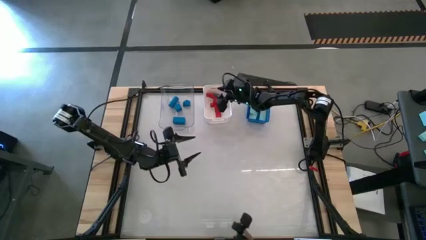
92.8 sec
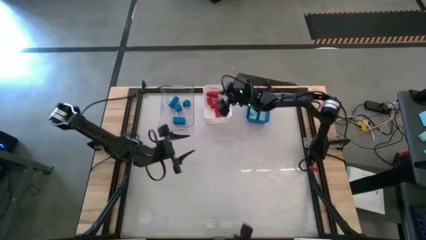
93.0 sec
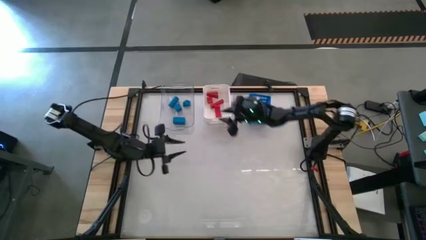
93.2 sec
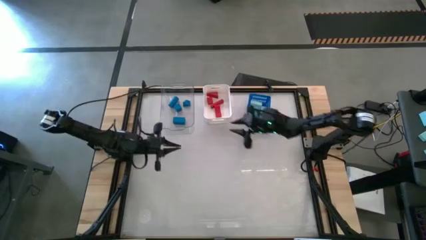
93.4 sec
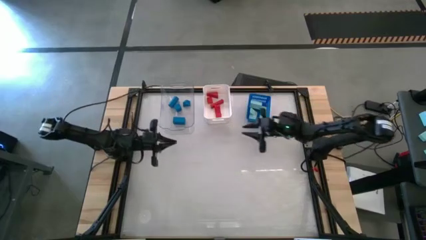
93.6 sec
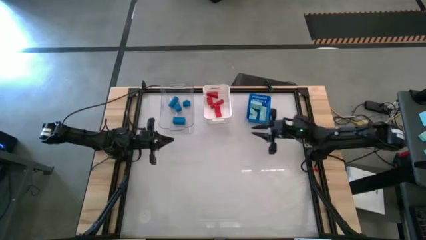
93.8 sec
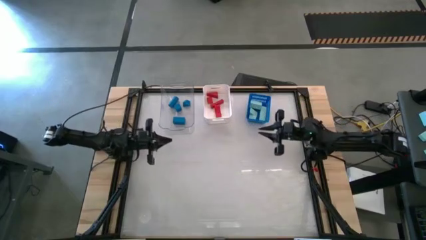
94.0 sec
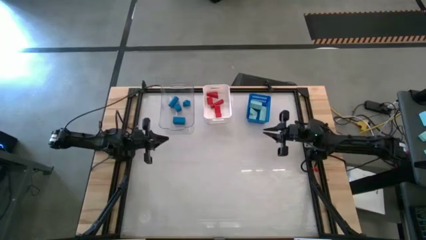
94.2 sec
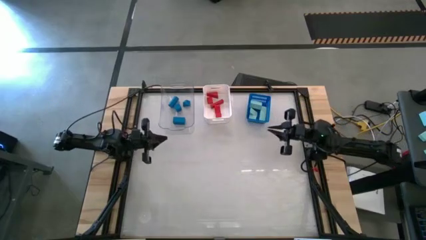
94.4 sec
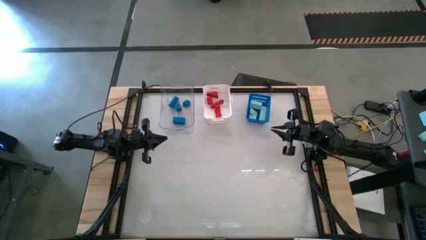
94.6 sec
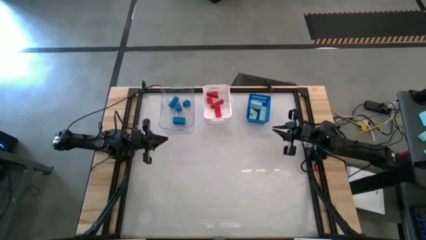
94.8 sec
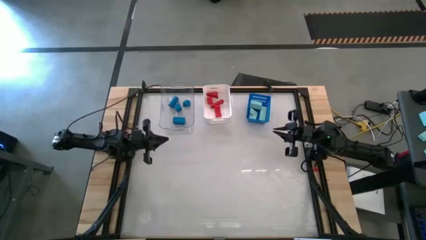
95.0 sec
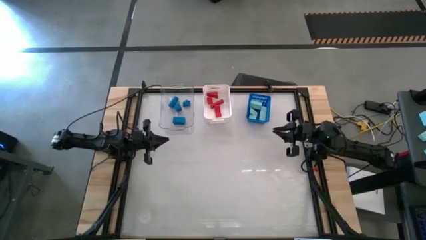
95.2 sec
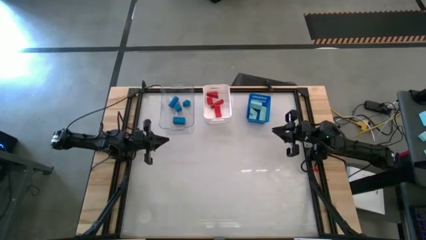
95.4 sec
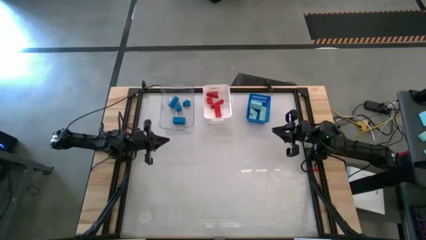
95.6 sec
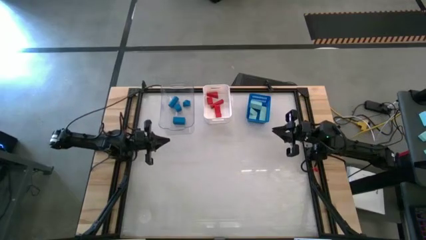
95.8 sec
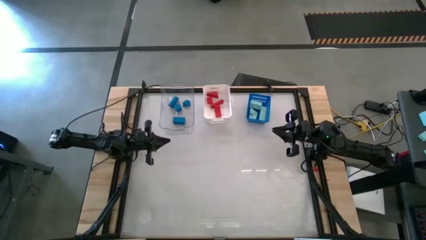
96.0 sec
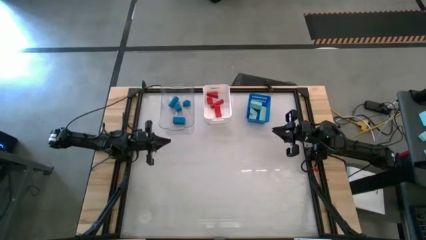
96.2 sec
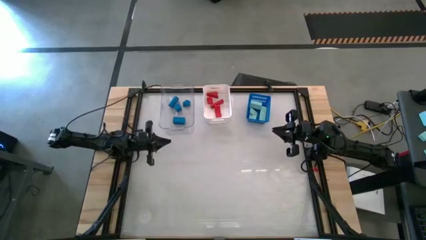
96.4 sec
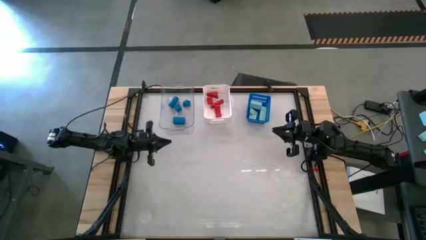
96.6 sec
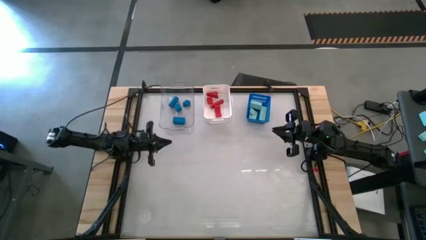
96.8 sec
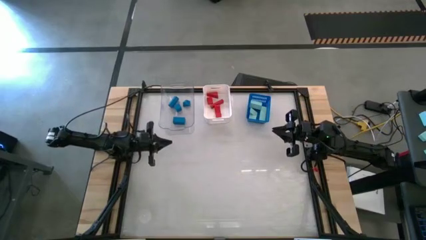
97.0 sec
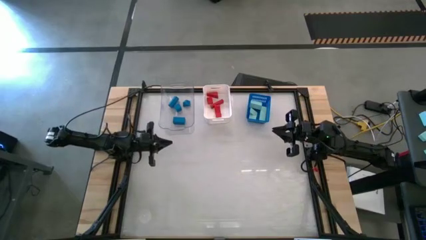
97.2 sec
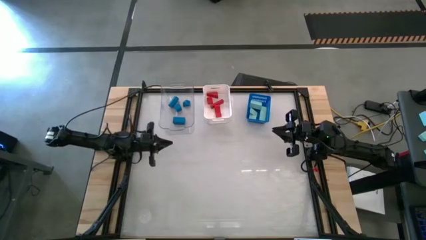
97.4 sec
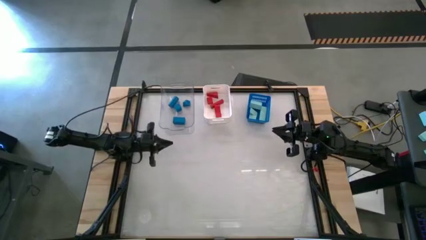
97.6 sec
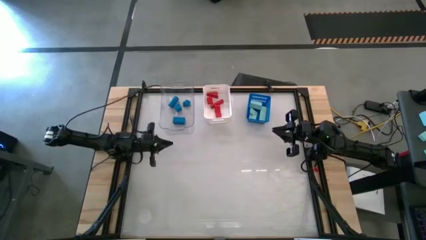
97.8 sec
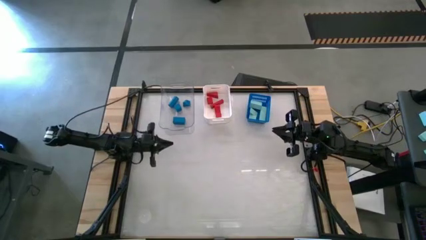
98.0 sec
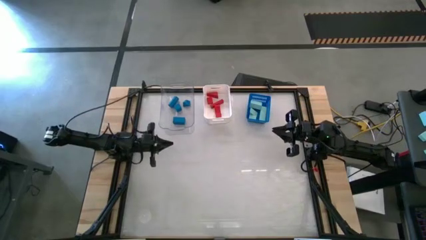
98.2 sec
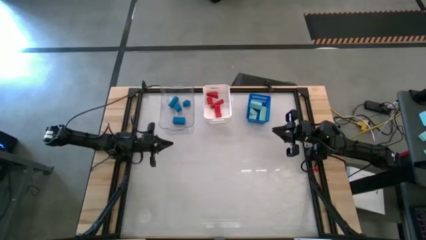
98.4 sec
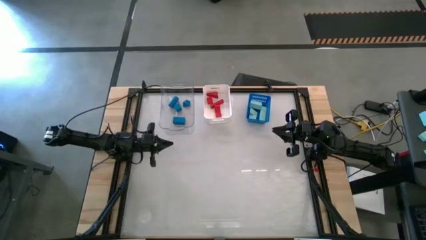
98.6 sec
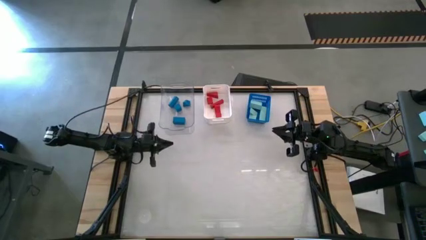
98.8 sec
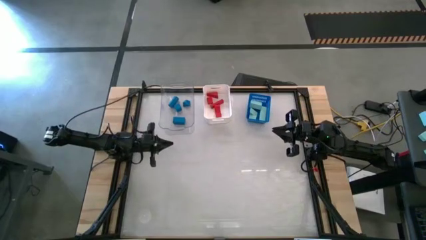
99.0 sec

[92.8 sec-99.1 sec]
Task: Sort & place blocks by color
Return to Home Position

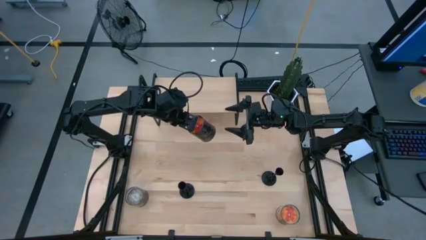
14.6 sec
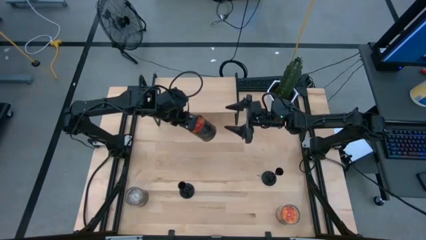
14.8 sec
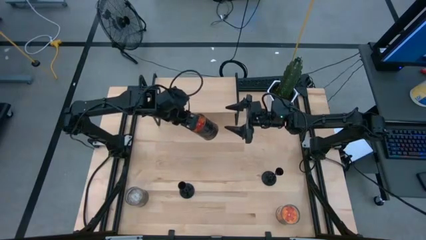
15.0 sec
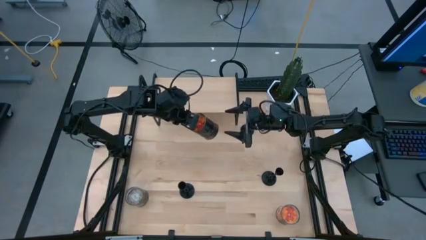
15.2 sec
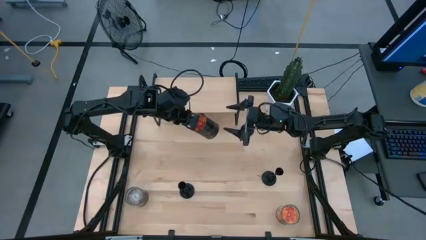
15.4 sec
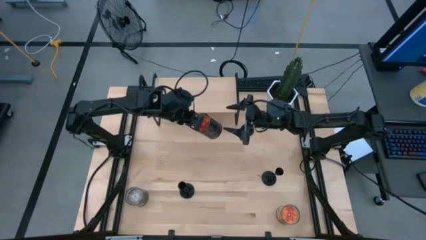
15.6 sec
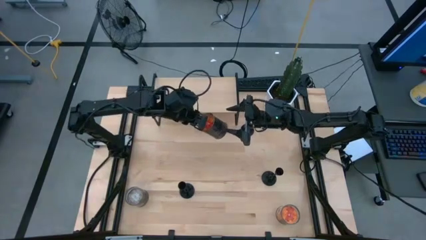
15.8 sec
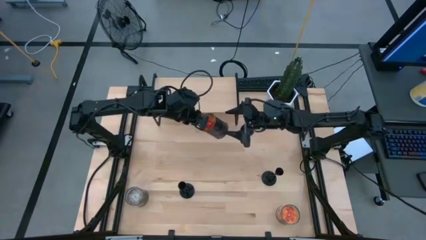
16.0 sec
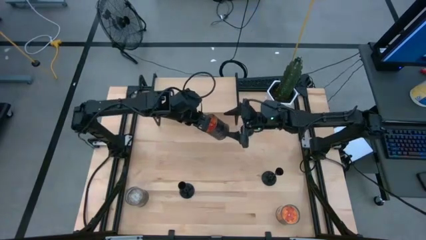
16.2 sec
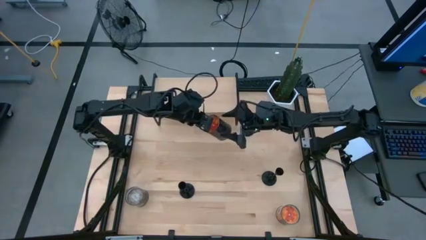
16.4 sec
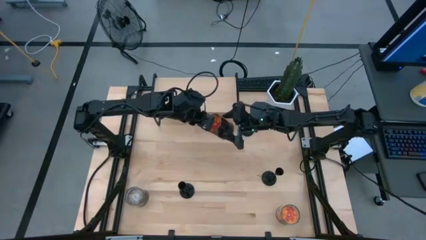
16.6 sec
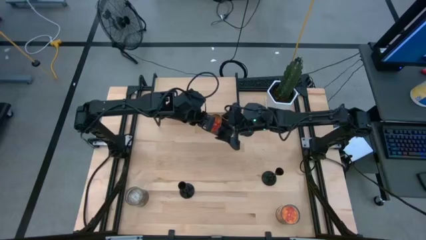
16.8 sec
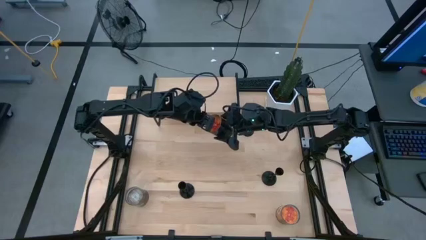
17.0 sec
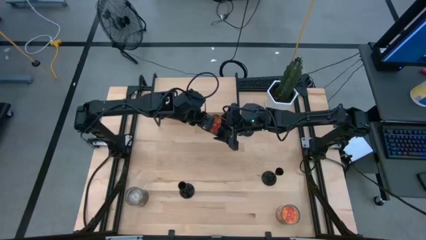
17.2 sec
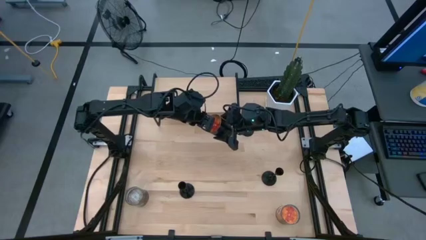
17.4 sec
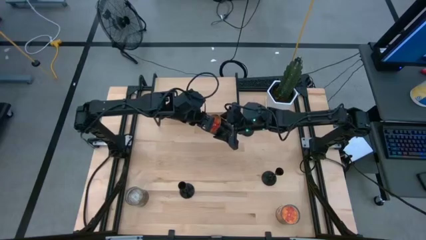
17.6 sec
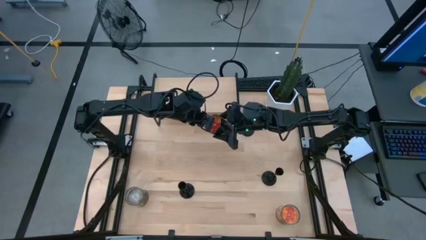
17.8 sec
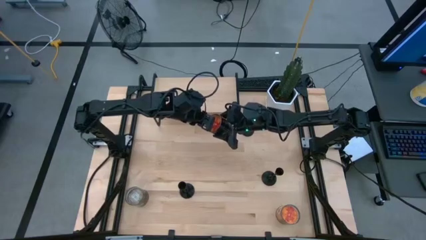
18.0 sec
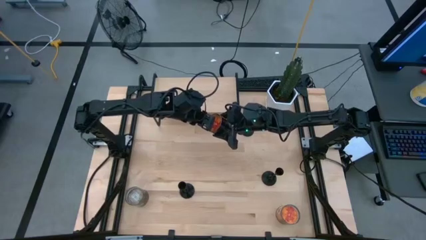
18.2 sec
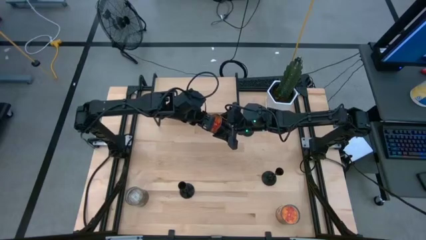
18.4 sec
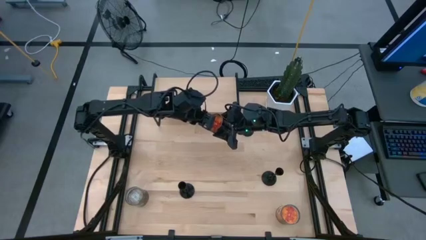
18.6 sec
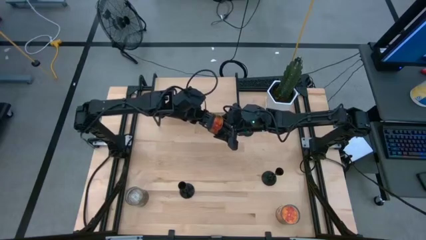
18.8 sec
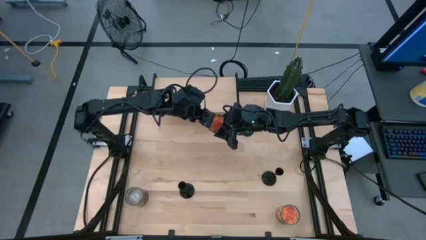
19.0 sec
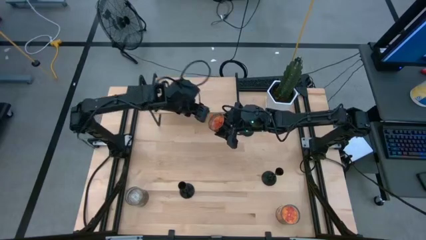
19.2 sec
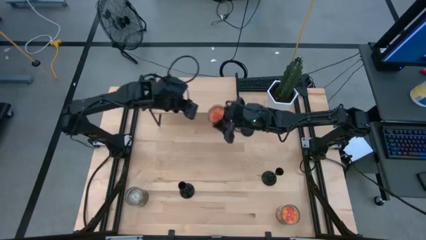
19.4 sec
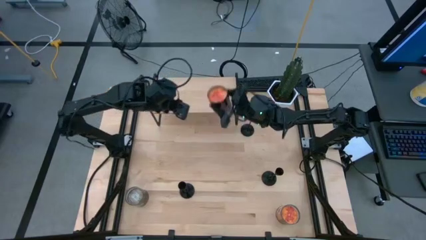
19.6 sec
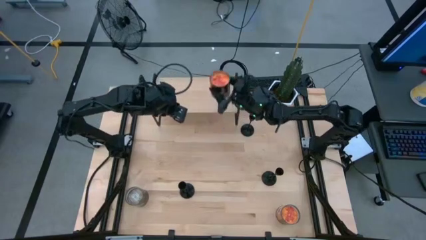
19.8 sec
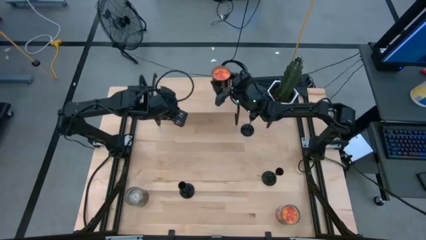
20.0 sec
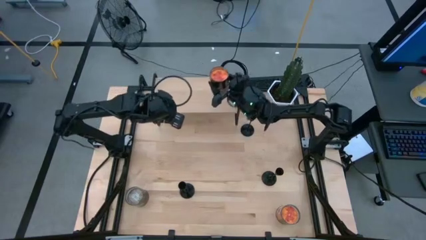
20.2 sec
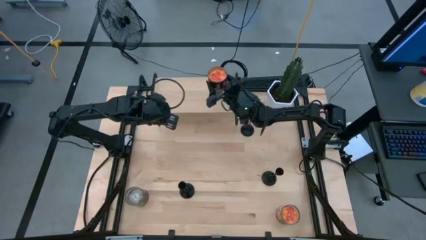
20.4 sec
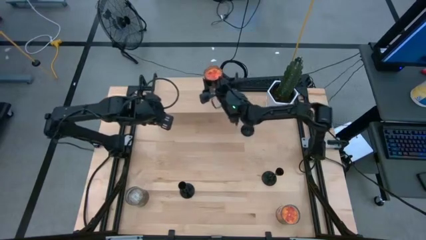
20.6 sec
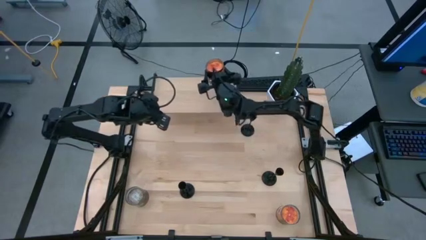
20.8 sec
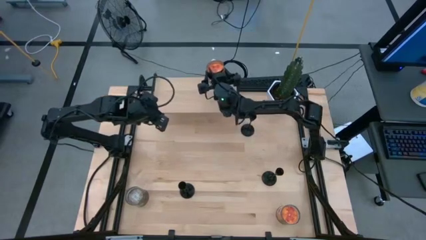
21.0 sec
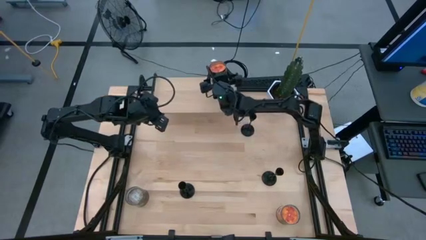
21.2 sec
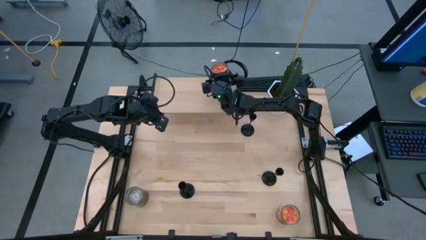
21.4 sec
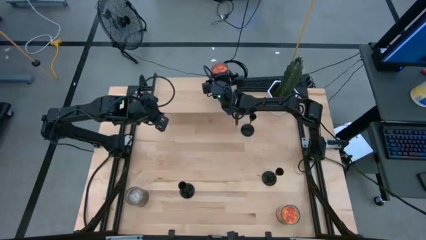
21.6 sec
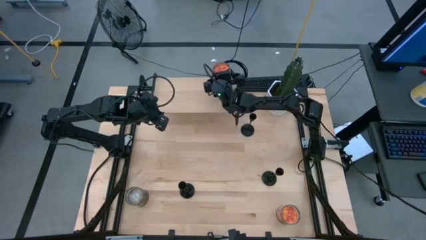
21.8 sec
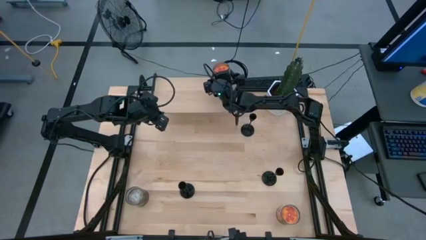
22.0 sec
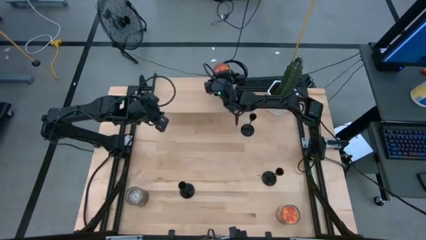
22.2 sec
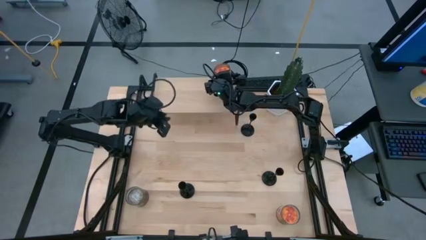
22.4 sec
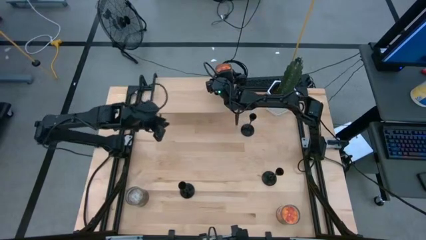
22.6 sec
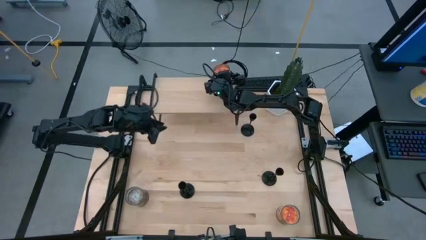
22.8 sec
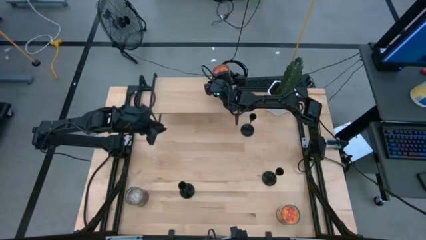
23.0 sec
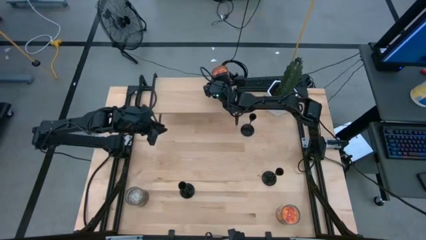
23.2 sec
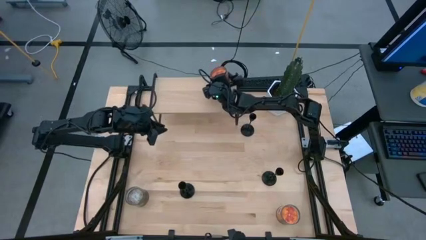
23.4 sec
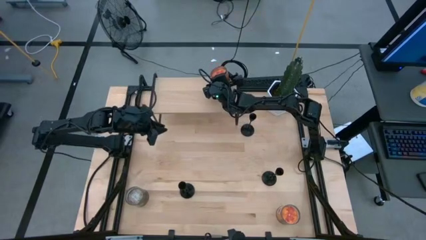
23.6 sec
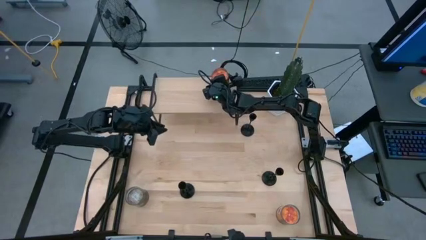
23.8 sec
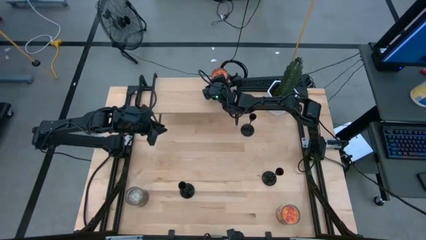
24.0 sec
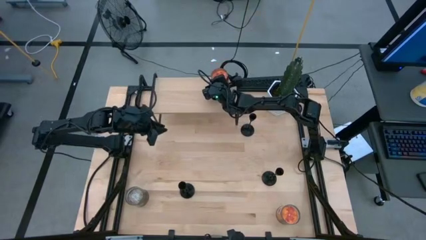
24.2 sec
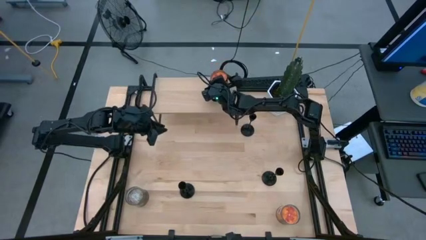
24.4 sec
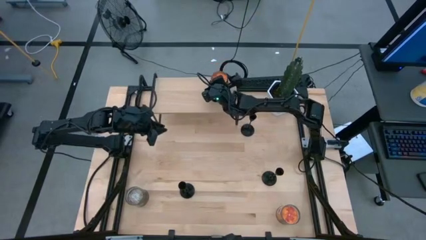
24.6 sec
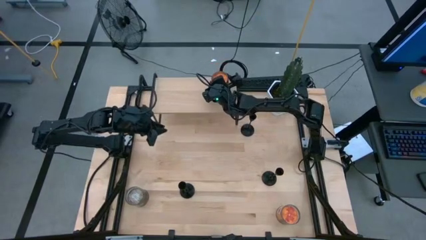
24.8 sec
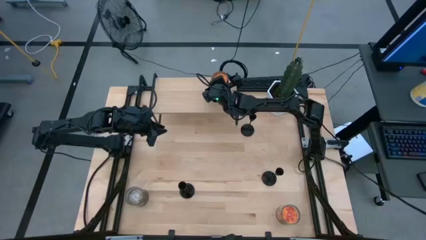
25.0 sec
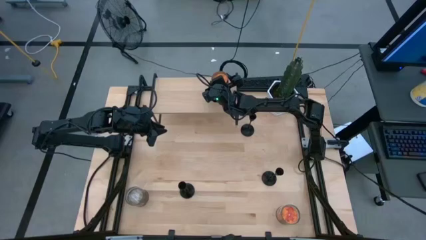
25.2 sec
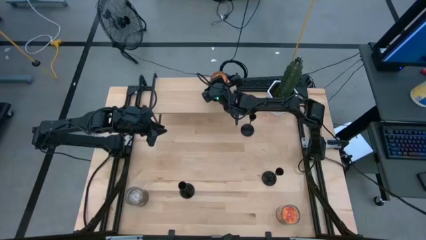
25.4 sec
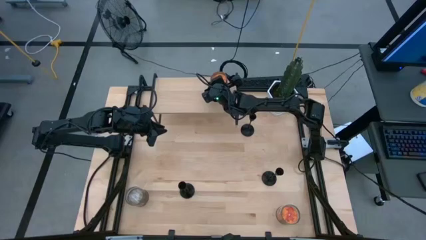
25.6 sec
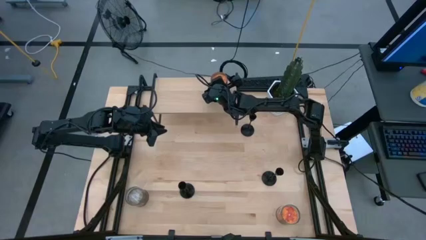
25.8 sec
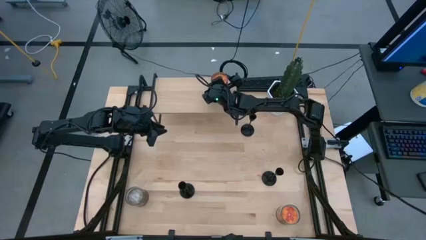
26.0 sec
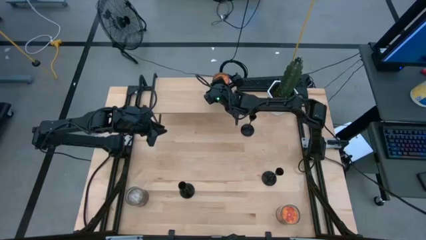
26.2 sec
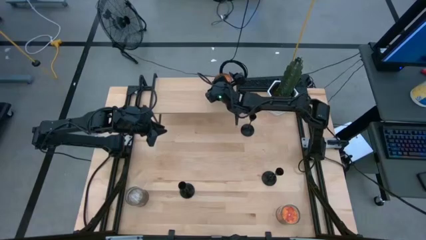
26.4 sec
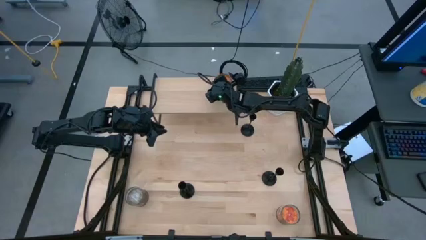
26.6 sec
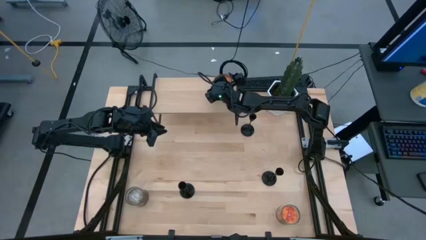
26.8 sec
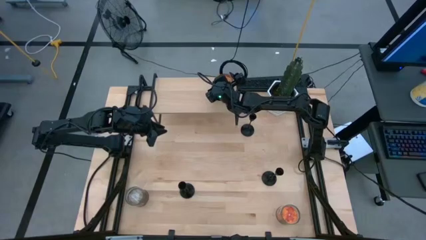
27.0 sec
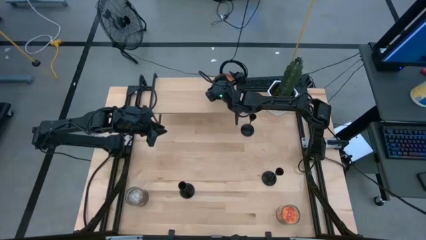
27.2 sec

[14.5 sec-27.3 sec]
Task: Pick & Place candle stick holders
Put the top silver scented candle on the shelf
